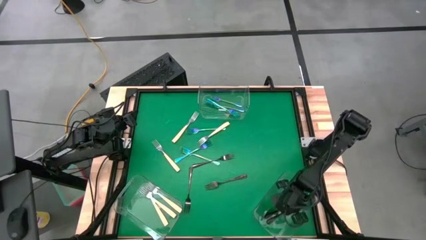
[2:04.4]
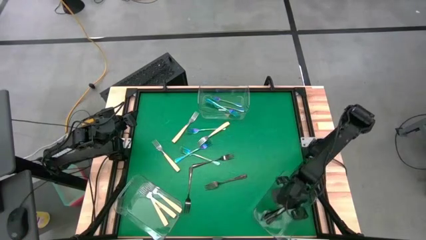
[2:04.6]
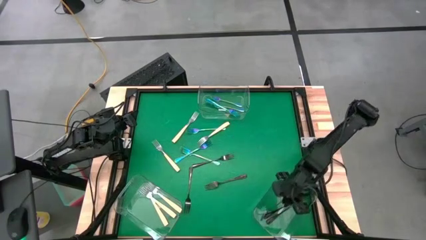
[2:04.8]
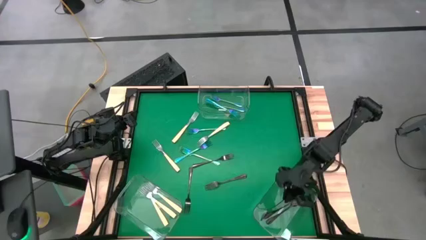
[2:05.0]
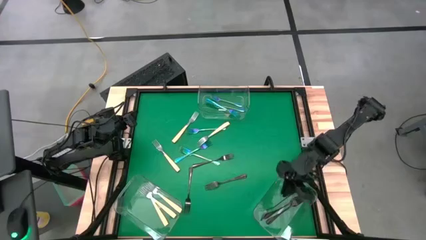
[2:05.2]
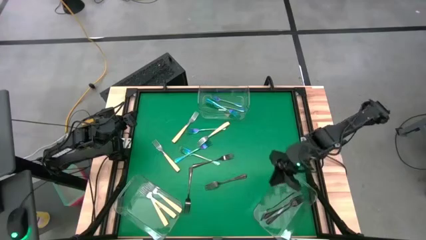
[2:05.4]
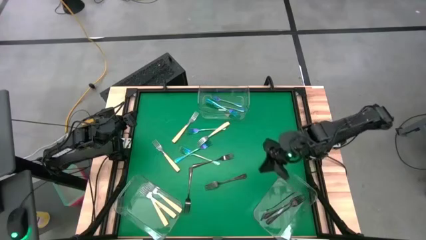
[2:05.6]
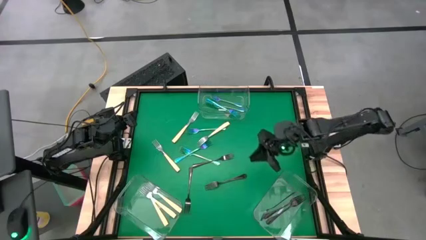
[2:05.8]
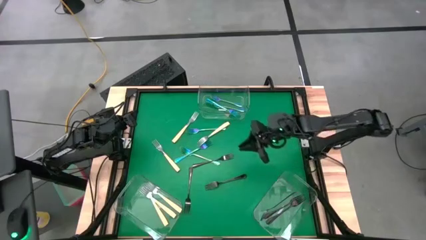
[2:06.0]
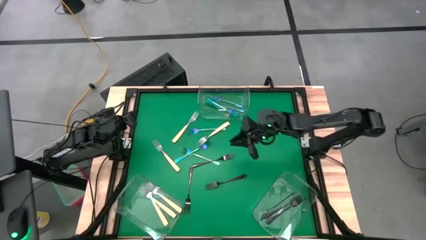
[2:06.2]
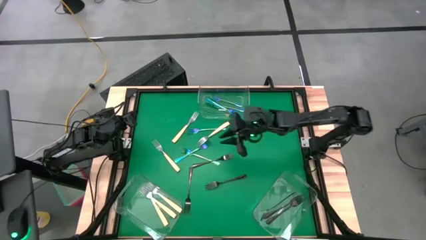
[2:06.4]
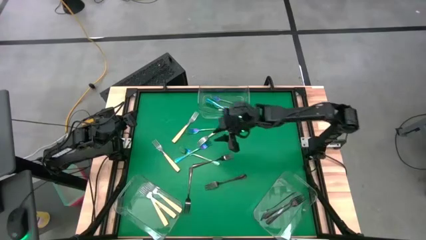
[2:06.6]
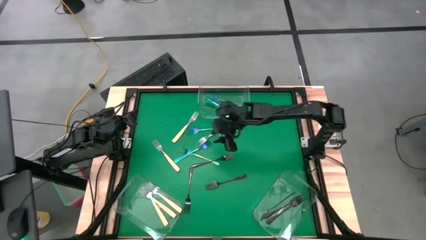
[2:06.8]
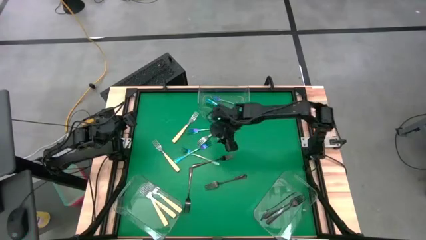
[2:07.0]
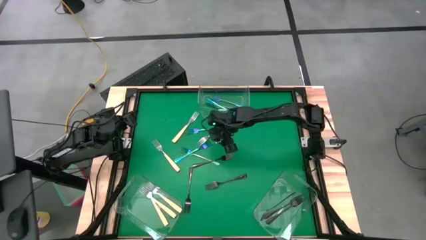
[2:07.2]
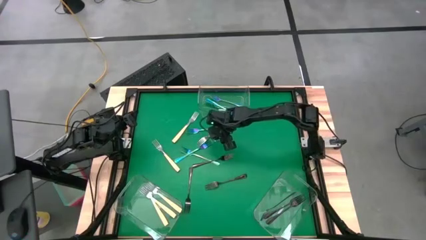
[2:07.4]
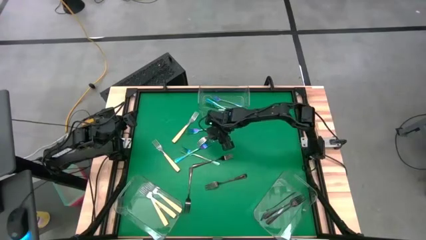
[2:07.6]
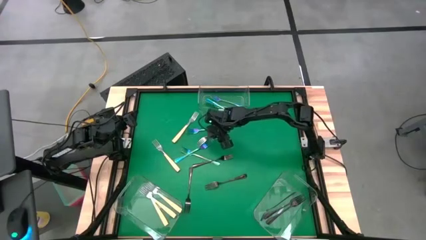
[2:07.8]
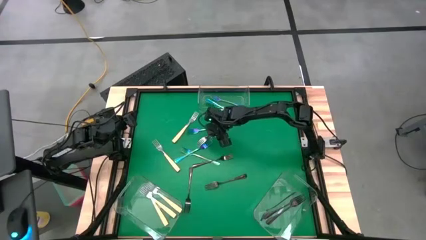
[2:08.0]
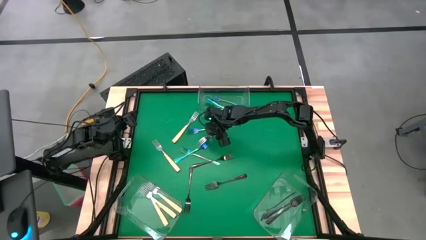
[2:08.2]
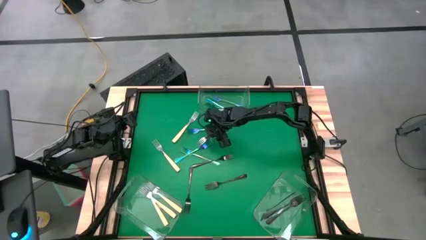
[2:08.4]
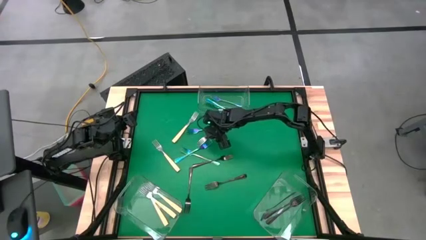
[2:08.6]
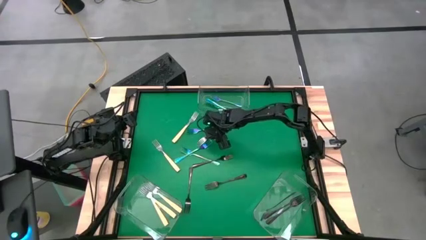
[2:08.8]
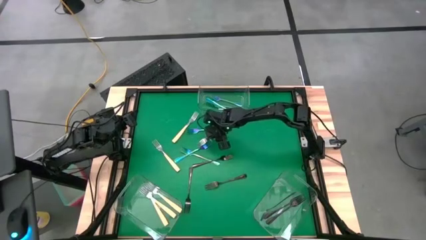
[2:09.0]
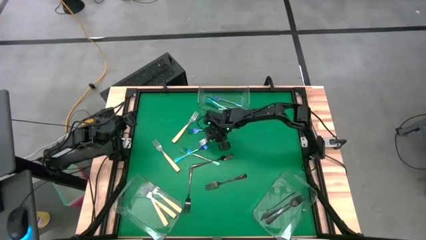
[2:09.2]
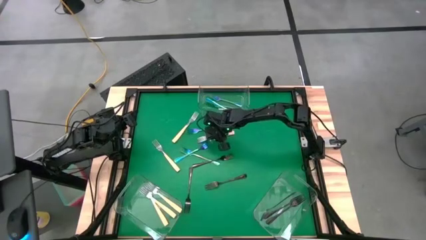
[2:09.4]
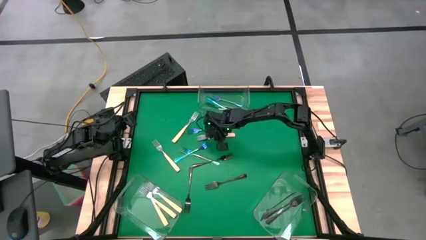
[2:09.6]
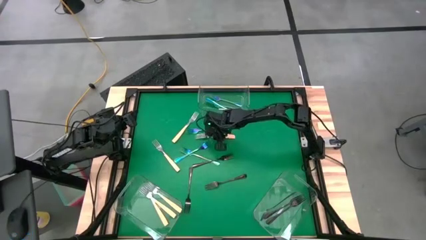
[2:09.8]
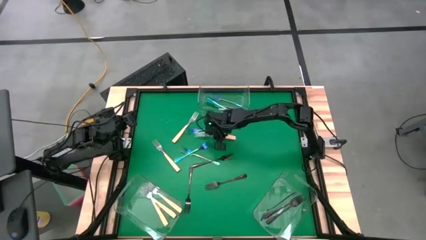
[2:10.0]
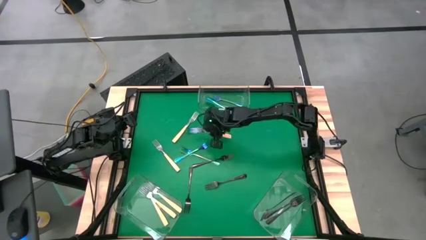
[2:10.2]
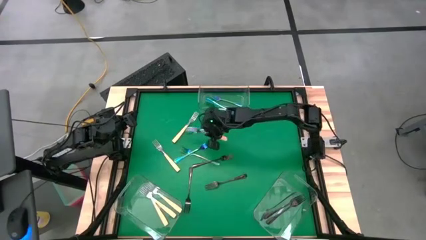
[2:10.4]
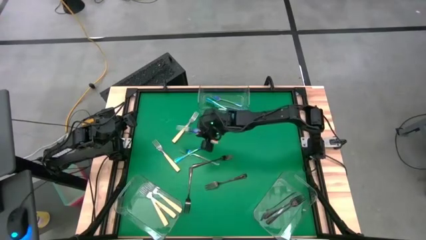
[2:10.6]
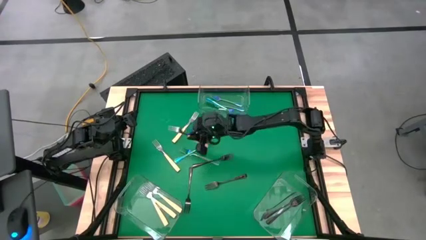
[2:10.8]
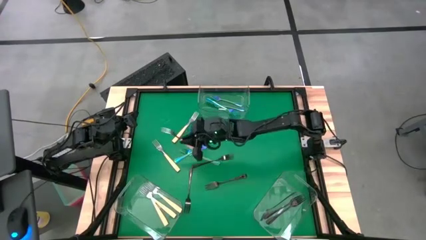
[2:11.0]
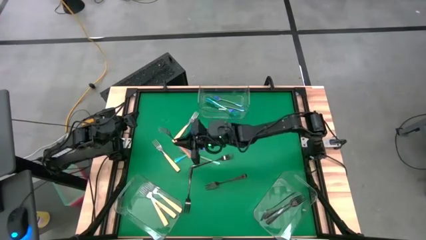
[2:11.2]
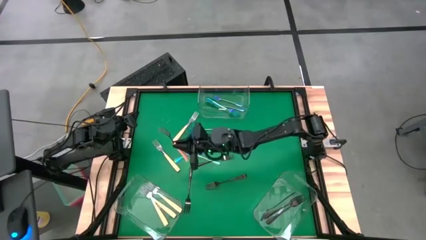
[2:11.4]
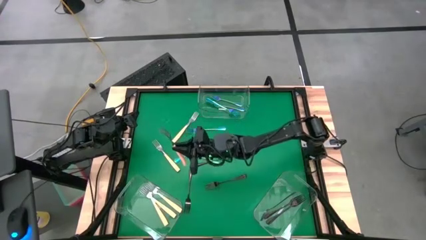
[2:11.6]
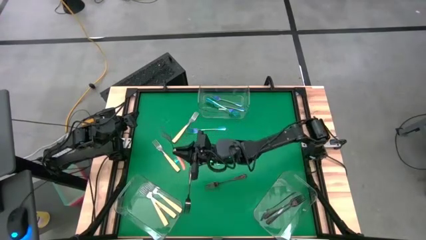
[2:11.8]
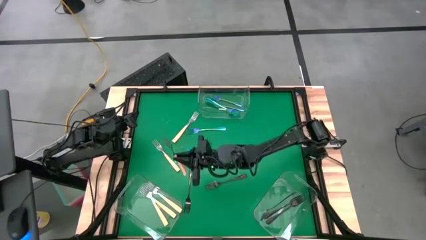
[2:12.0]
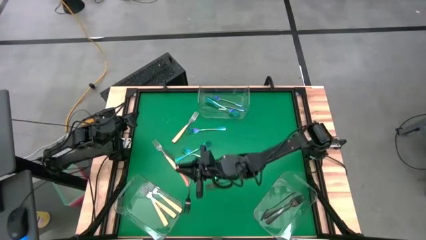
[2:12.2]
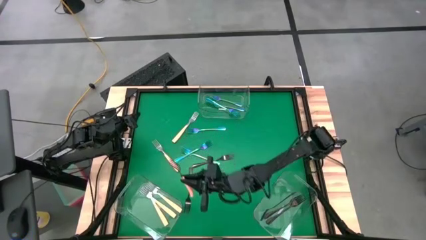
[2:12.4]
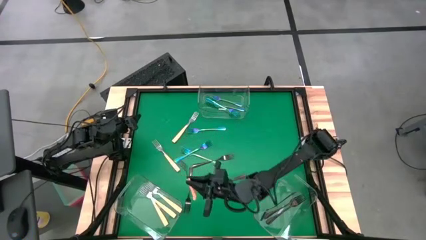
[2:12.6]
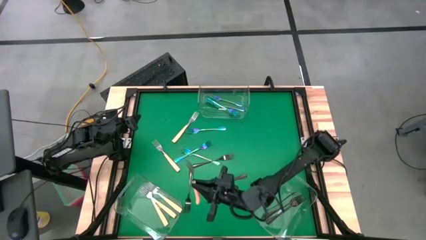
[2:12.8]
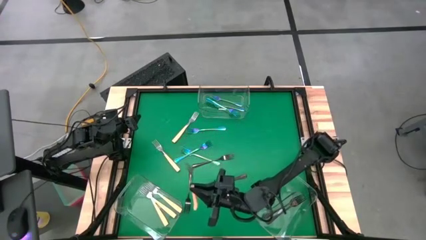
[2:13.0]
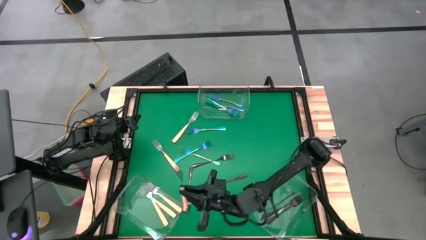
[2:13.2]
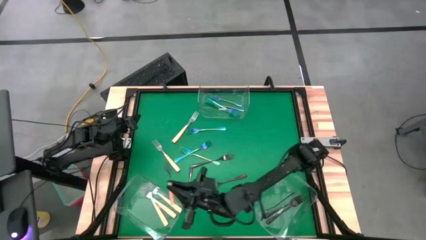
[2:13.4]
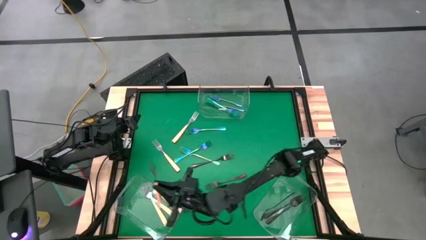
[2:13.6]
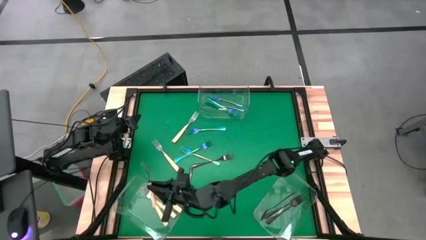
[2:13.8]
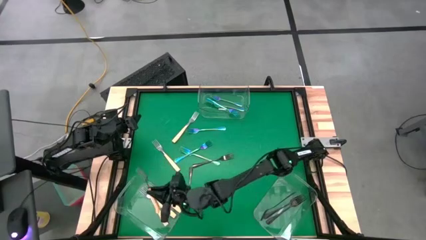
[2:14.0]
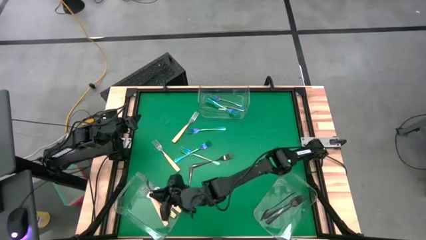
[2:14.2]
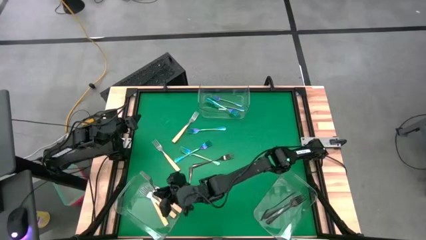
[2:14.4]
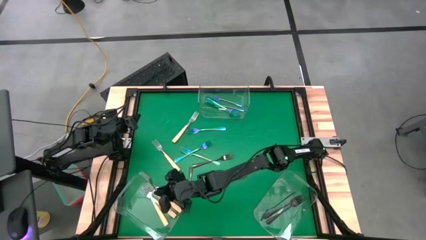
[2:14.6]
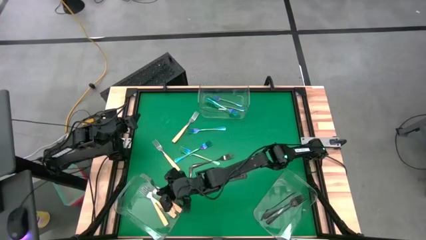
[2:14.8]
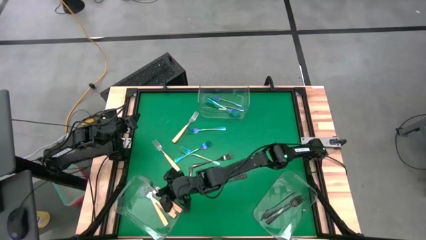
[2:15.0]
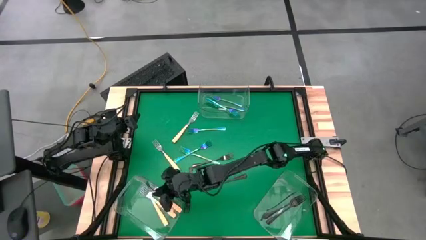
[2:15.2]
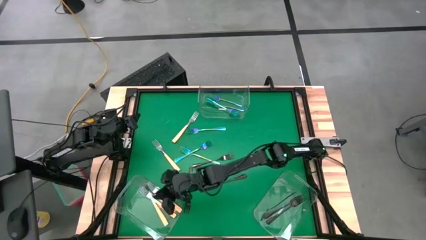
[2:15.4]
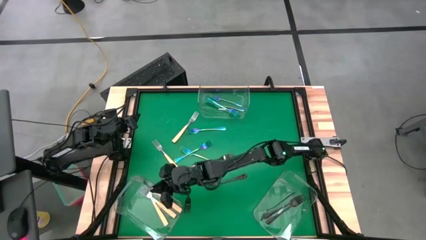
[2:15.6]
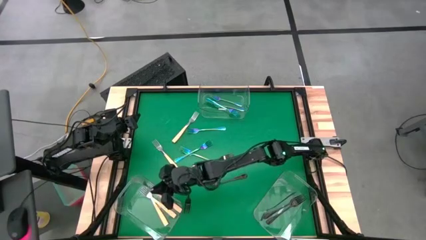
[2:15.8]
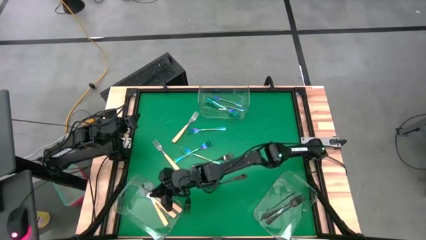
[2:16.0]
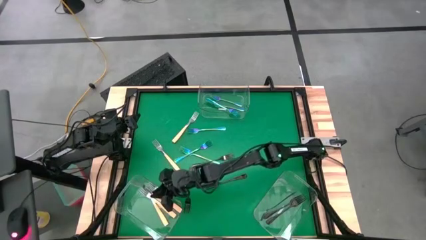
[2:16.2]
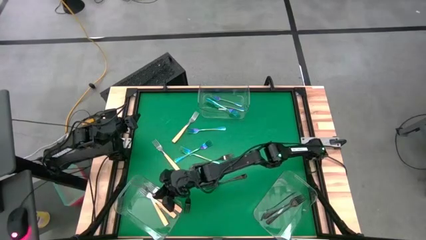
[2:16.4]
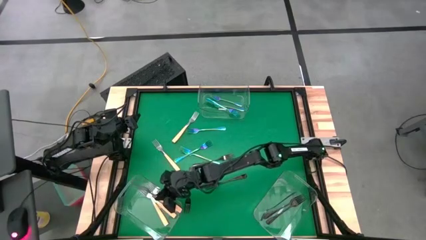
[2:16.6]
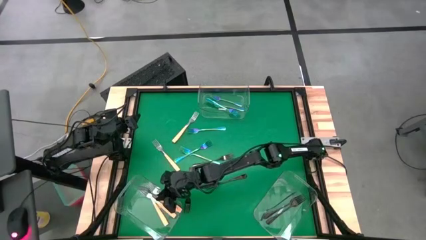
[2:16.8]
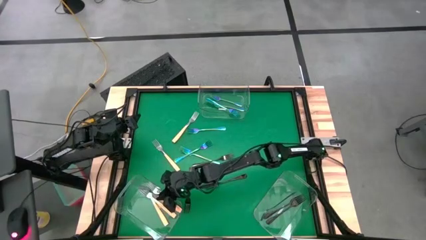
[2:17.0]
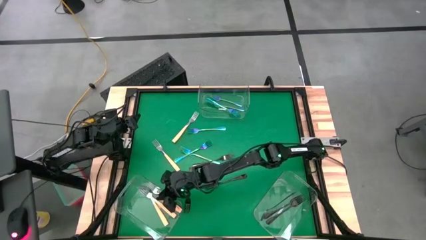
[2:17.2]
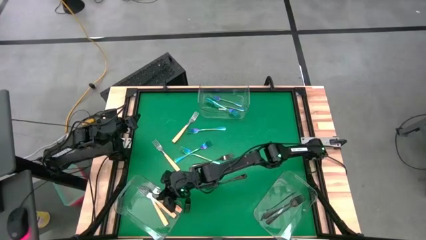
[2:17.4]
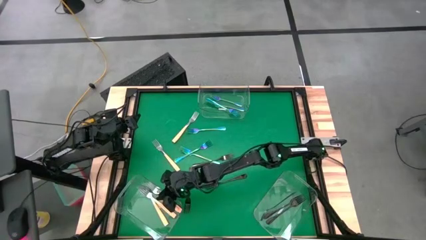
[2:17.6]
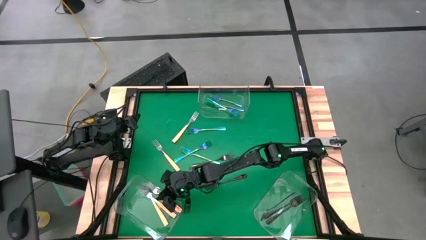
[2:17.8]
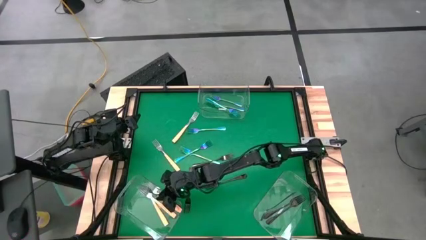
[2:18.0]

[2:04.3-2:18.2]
Task: Sort silverware by color (type)
Put the orange fork into the bottom left transparent bin

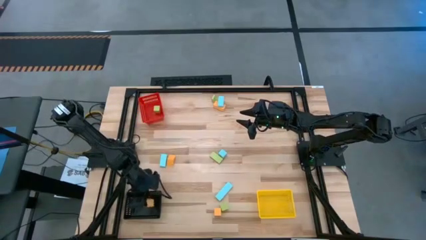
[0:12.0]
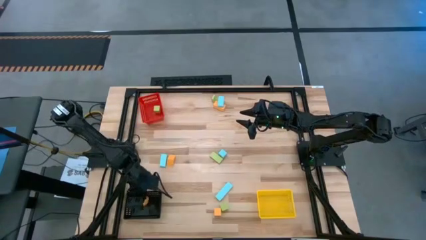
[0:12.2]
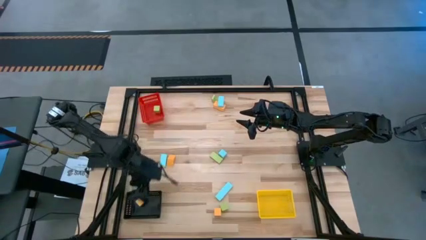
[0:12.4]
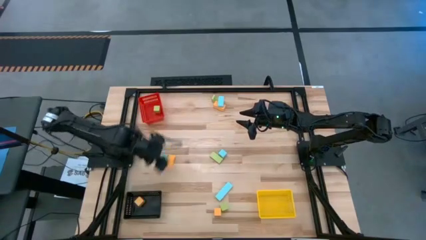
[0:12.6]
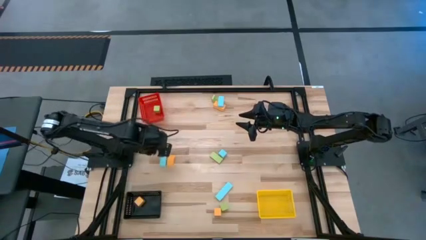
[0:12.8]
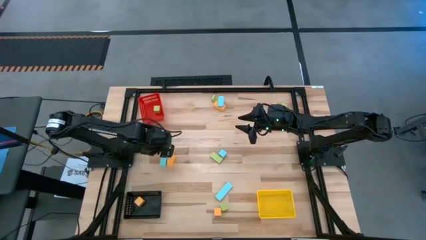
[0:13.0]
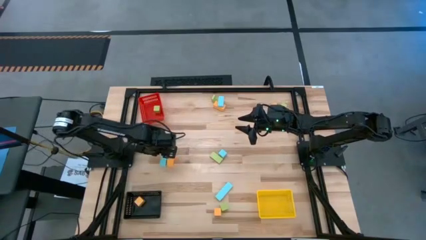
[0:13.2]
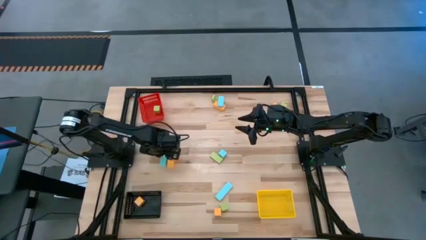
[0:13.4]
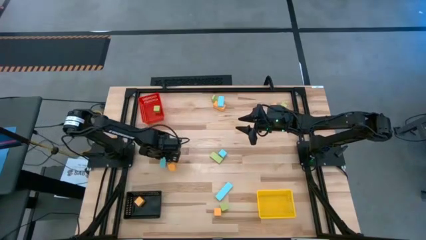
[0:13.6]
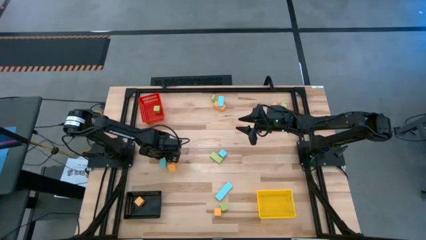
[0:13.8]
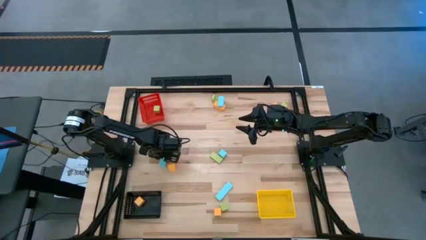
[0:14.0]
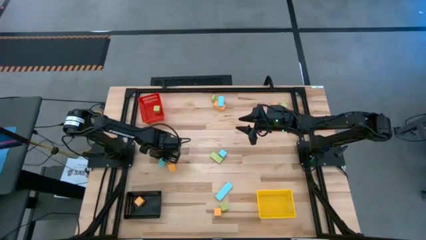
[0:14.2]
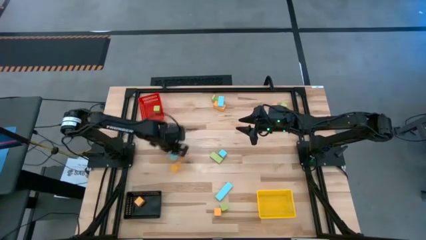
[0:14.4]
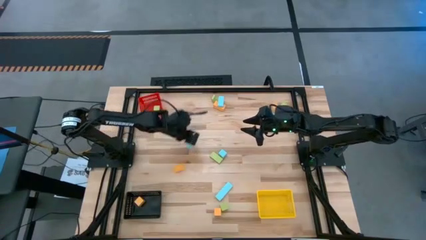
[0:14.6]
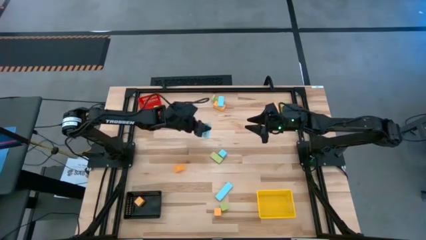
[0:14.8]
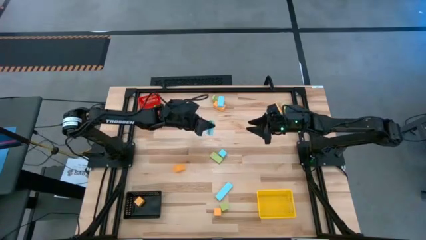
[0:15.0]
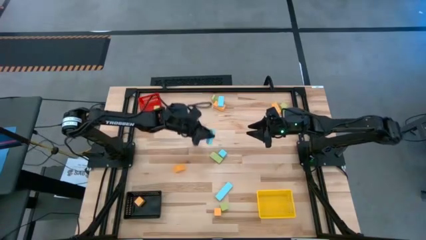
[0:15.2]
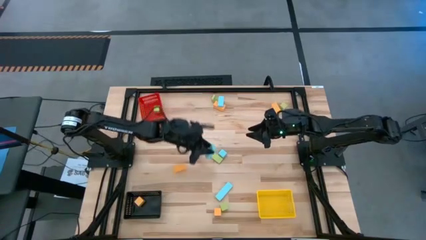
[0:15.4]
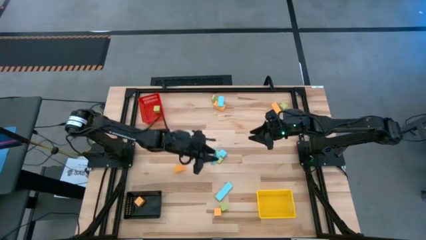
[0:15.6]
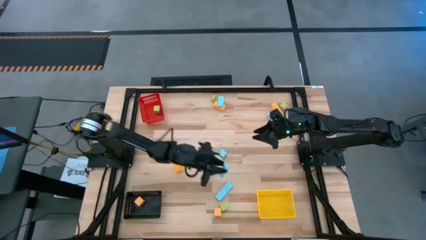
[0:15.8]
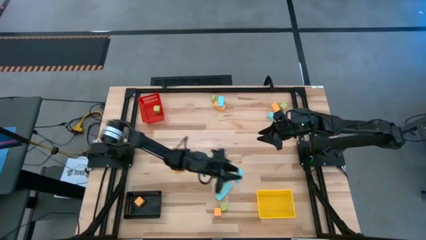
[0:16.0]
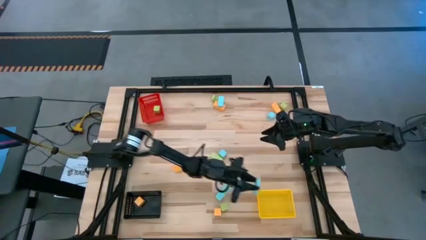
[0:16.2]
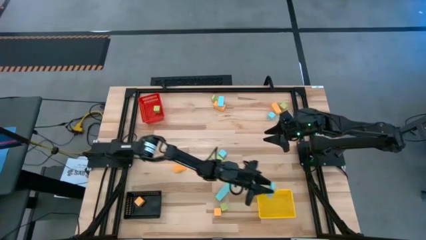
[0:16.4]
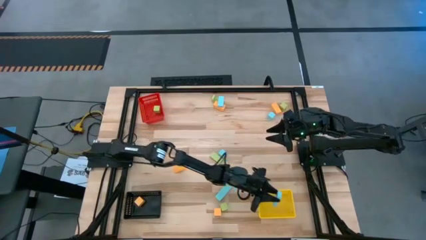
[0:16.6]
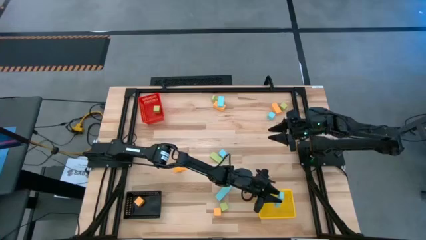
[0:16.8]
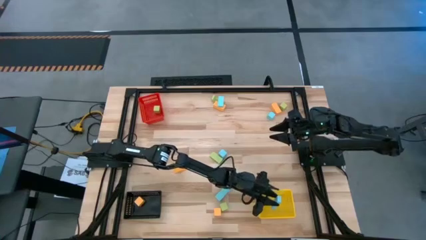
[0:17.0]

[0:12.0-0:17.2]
Task: Sort & place blocks by color
Put the blue block into the yellow bin
